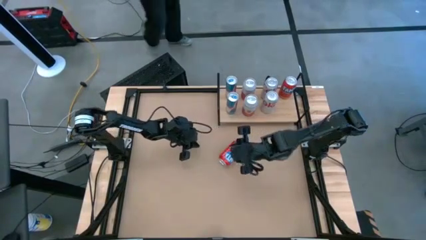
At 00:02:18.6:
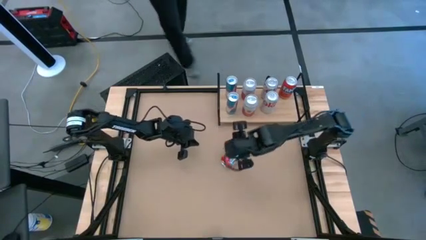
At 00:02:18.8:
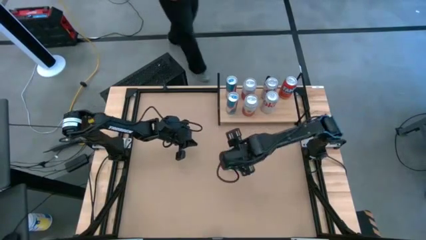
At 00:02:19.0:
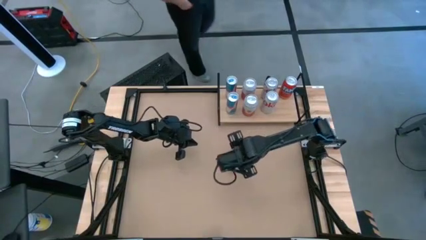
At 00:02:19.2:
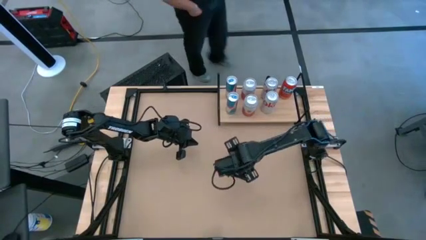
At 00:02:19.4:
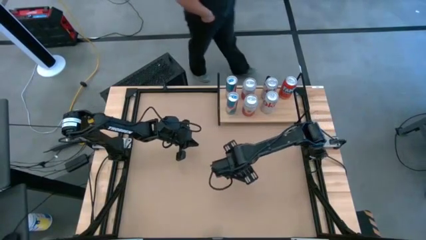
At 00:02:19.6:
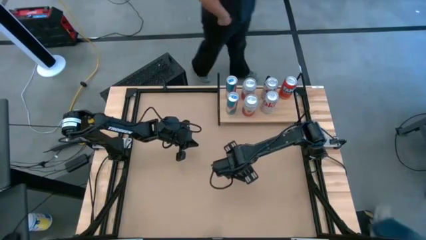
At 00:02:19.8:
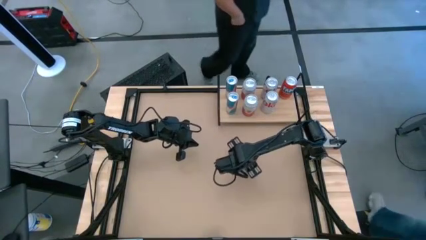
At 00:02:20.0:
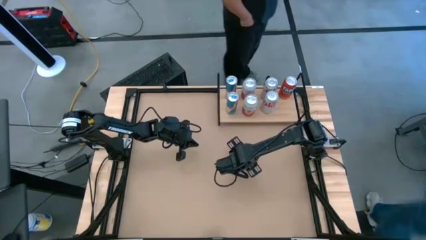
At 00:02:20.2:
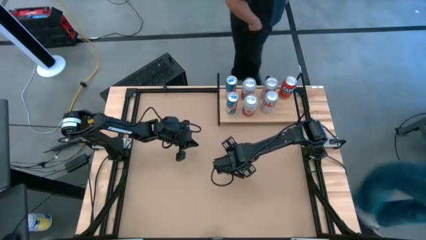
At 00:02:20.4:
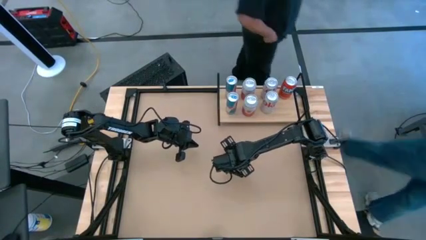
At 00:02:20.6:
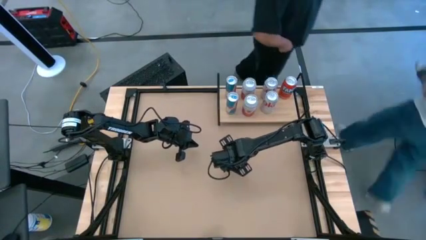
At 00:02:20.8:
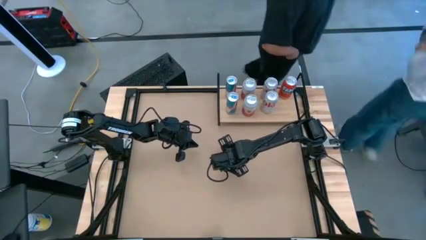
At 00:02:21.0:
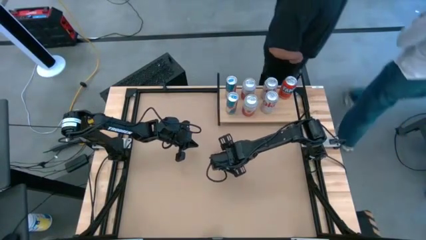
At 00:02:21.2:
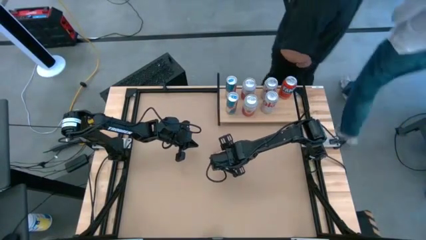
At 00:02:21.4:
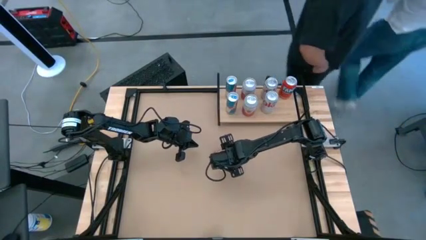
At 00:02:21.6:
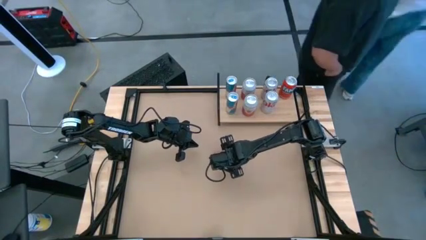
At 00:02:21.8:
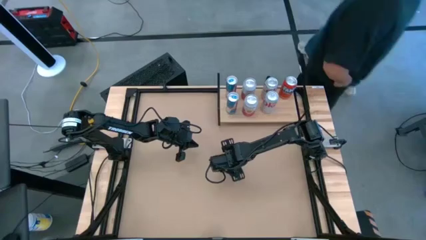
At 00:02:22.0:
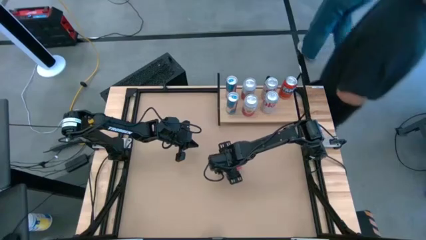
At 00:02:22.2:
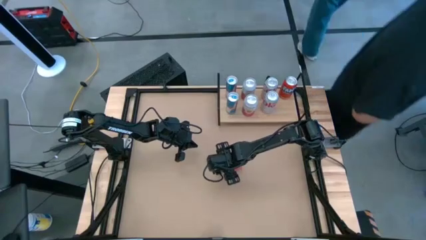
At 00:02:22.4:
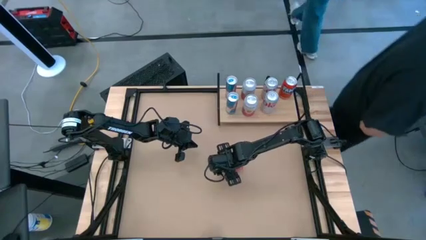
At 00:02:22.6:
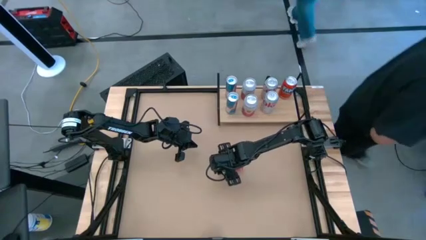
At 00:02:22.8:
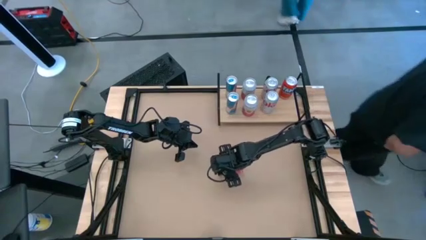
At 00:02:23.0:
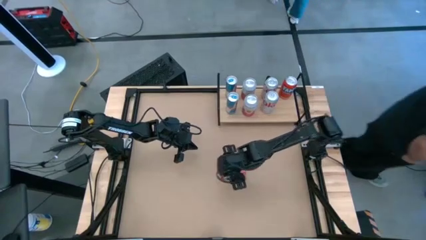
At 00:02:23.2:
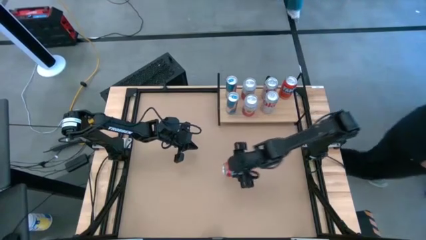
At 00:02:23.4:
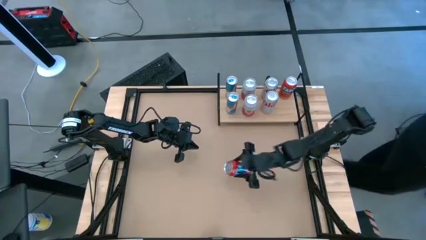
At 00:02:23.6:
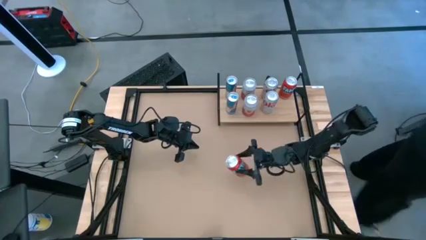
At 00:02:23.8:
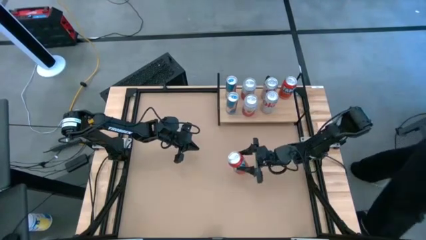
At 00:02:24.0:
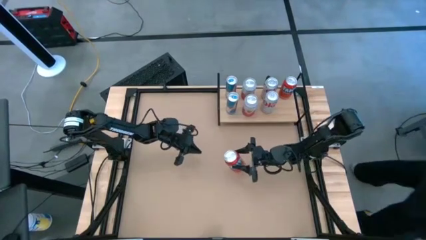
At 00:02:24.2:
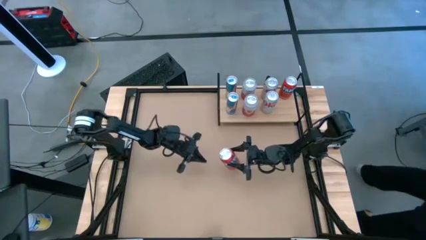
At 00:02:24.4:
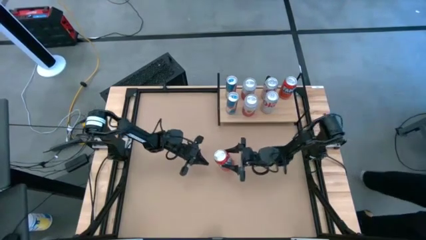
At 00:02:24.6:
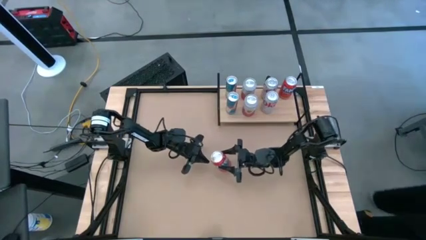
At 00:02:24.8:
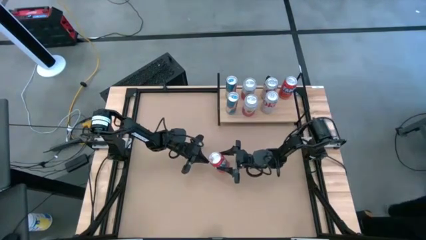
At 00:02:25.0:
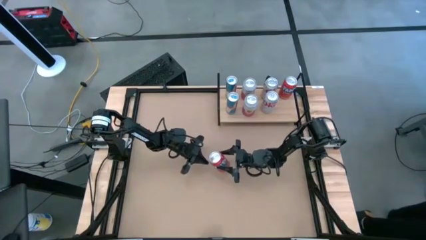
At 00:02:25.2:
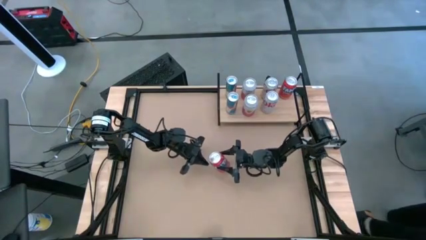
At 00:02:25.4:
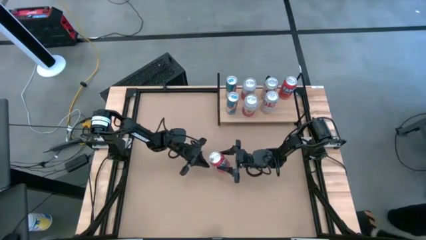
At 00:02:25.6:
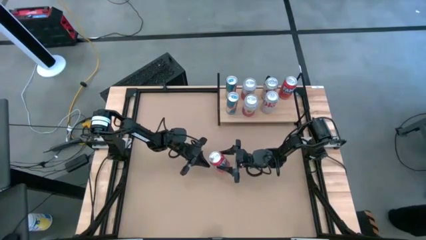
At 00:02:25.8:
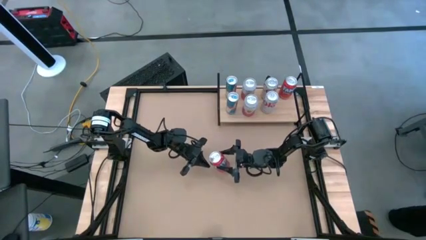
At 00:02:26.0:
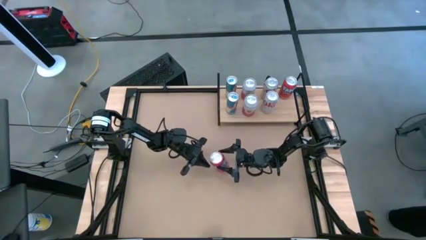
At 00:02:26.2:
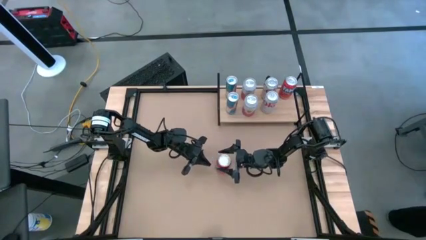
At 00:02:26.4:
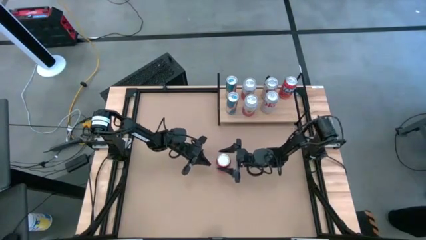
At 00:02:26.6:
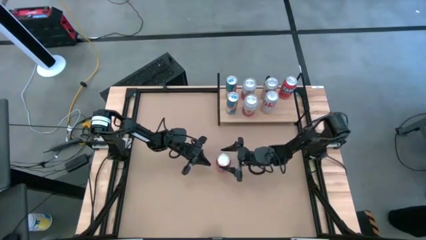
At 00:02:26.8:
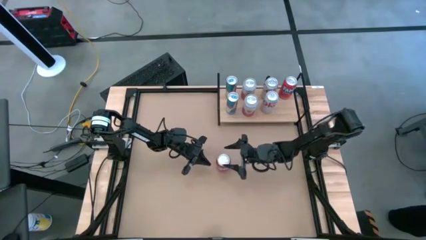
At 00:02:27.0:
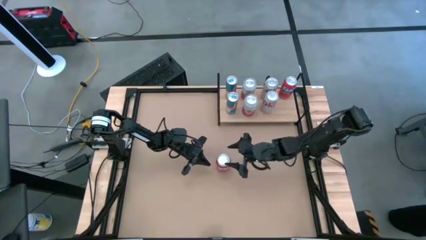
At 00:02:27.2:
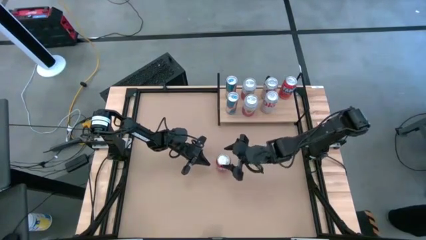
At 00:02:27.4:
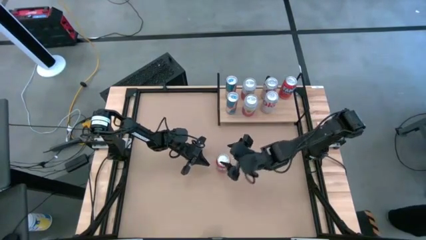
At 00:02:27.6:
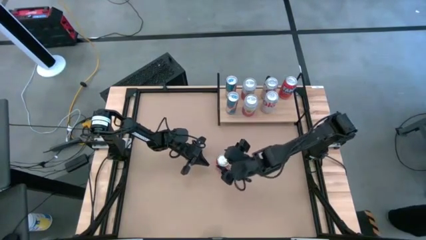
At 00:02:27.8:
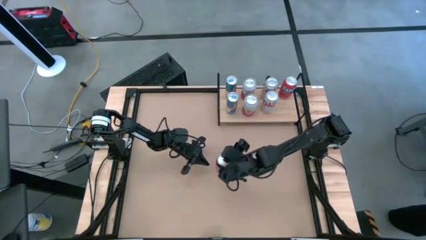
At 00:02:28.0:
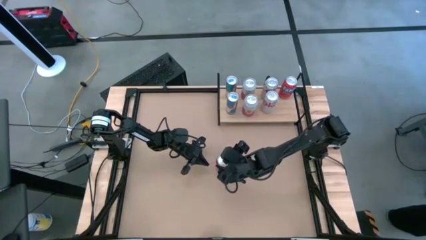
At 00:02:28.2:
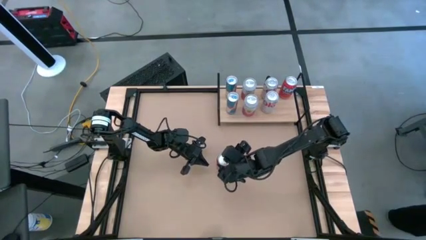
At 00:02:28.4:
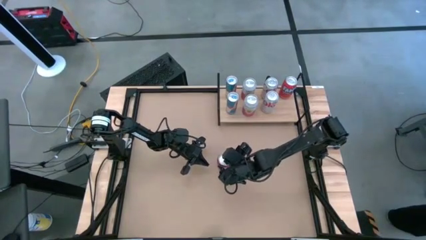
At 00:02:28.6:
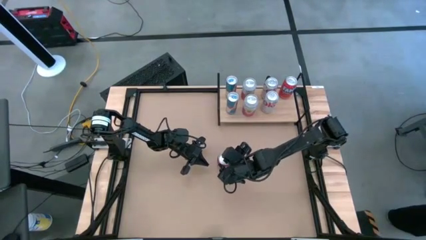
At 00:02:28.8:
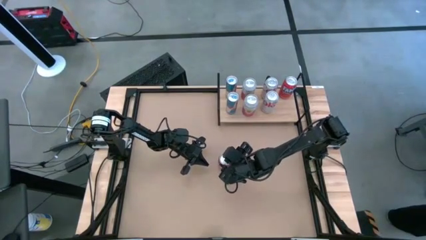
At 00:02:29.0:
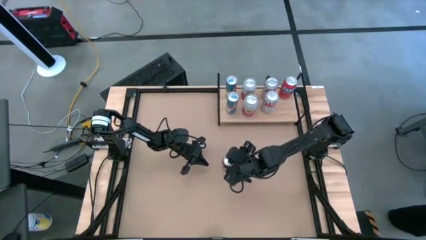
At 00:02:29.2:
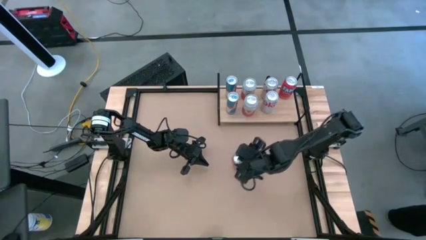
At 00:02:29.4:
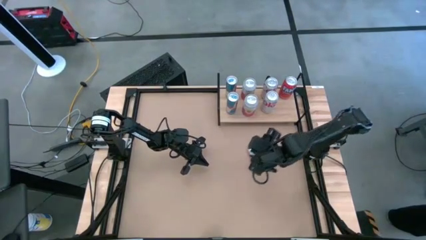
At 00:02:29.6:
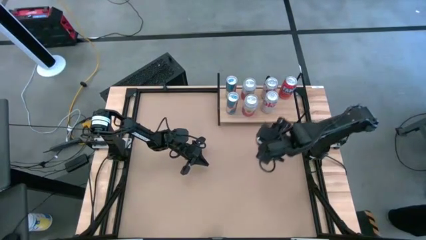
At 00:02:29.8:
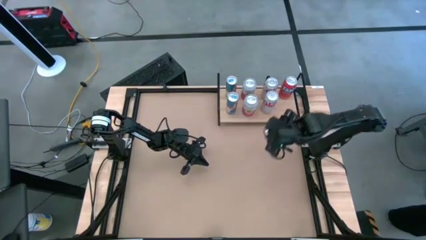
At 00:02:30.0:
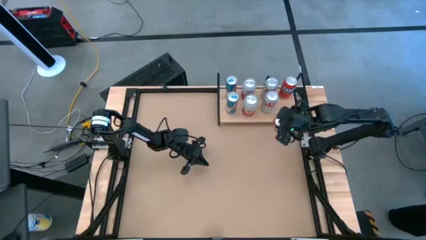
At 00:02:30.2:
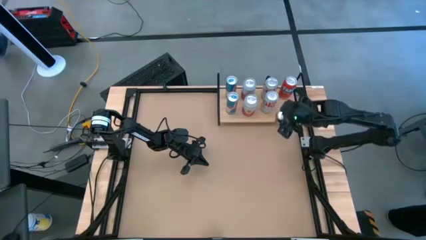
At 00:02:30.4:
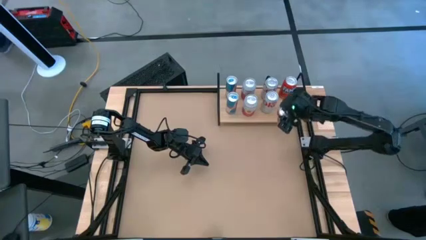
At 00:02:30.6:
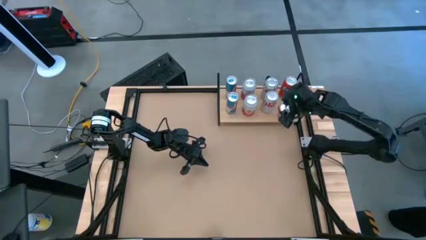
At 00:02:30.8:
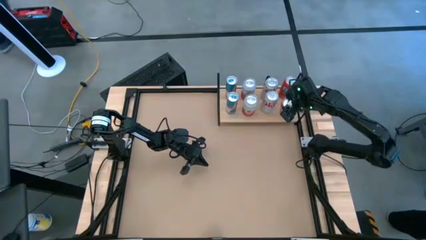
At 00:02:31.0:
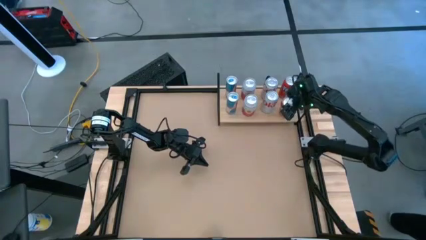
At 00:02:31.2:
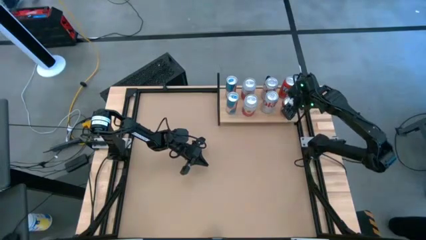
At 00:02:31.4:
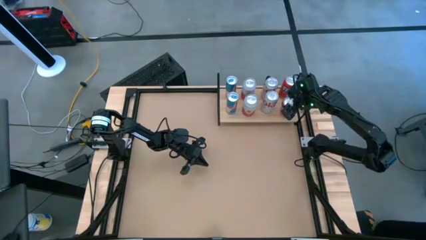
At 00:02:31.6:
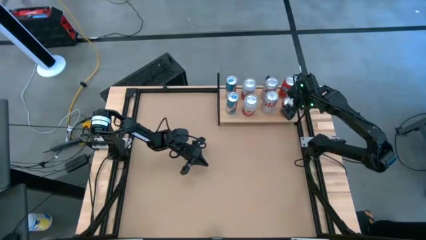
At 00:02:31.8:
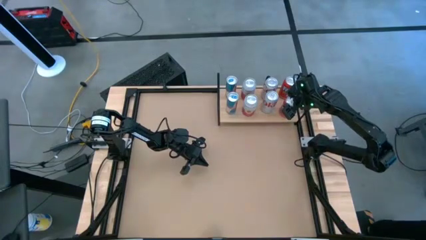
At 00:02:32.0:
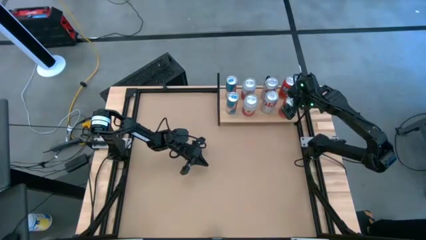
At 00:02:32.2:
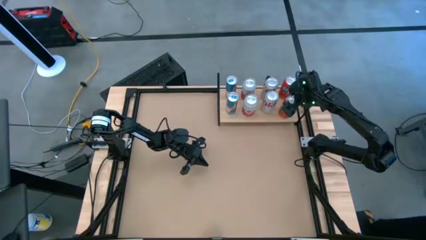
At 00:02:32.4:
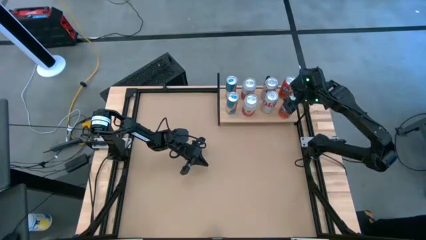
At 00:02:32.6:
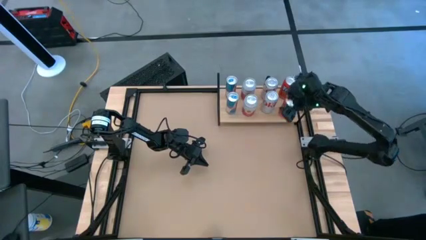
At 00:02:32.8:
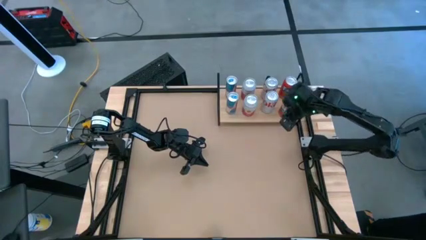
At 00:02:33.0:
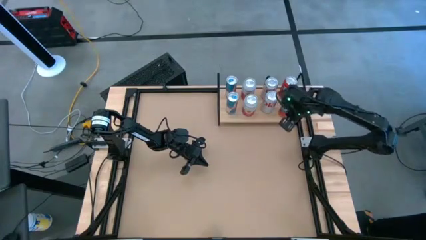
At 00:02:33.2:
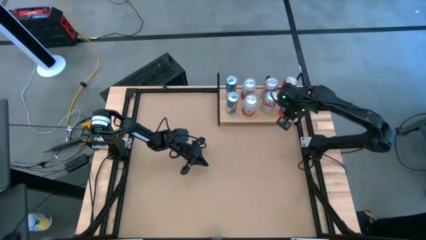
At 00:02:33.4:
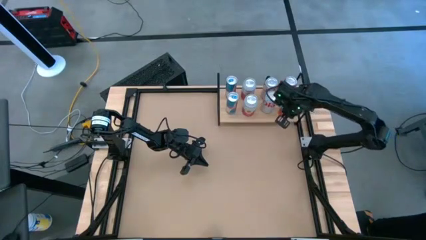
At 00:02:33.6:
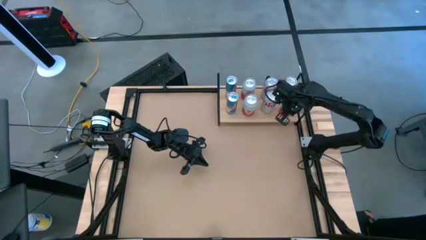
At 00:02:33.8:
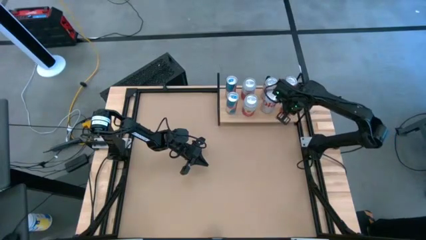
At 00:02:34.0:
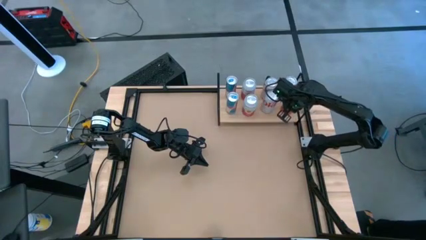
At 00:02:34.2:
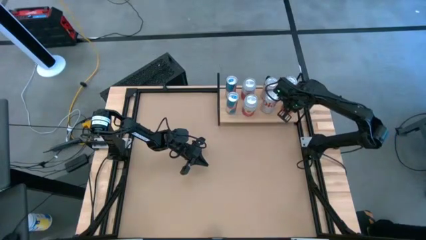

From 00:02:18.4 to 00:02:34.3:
Task: Place canned beverage on shelf
Put the orange soda can on the shelf aligned with the orange soda can
